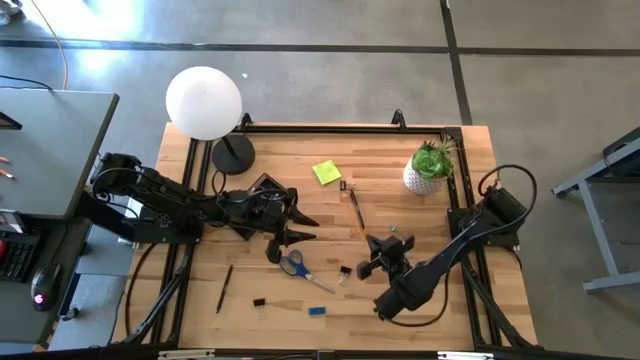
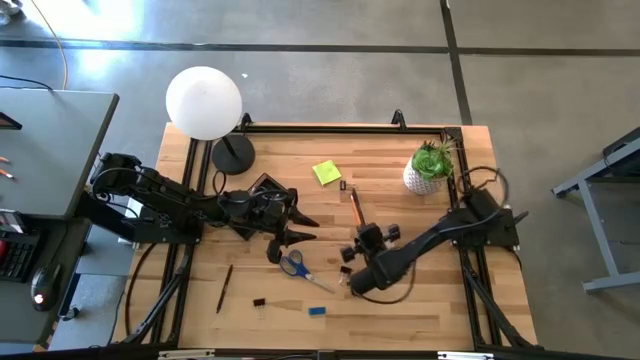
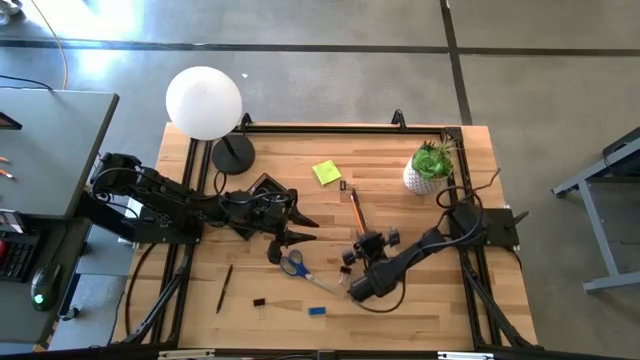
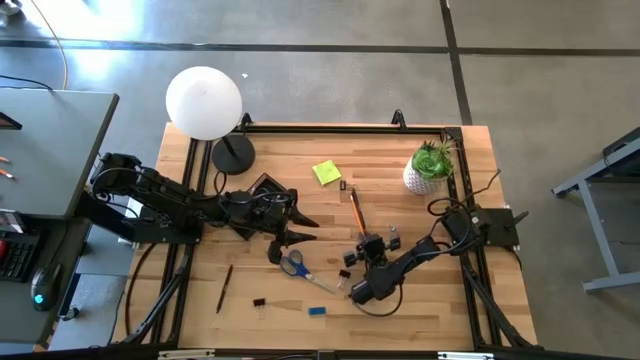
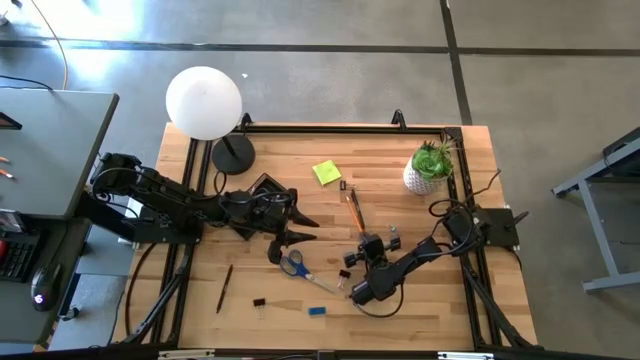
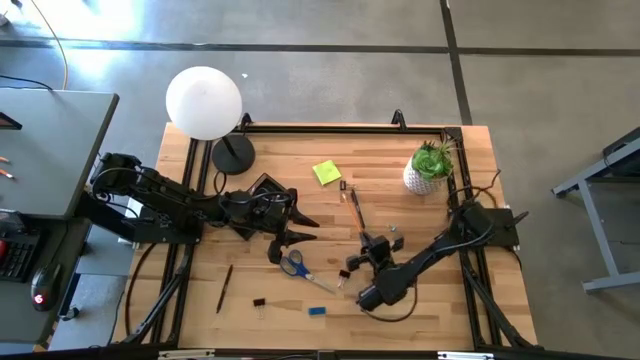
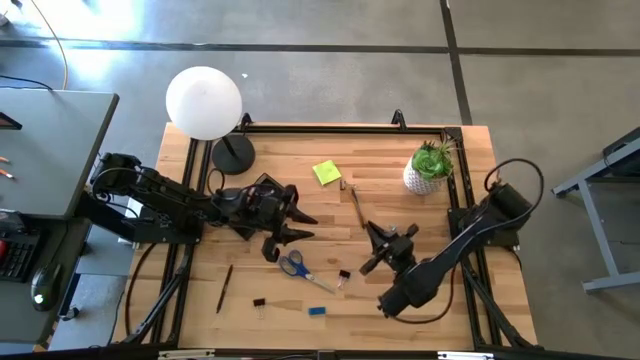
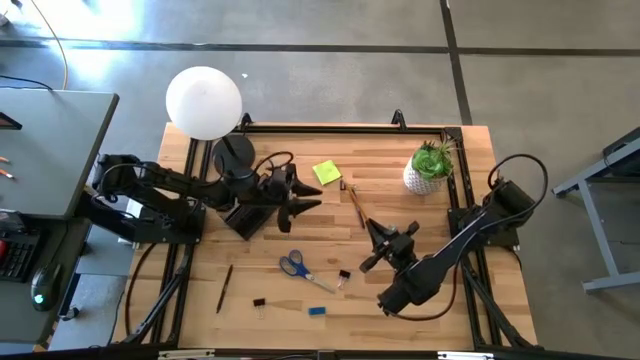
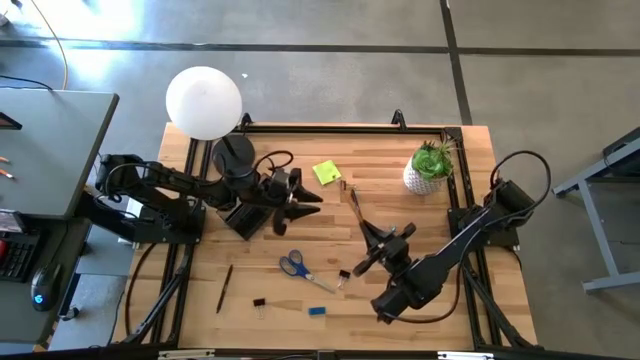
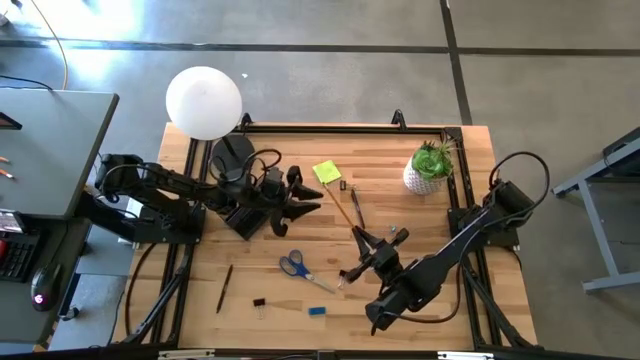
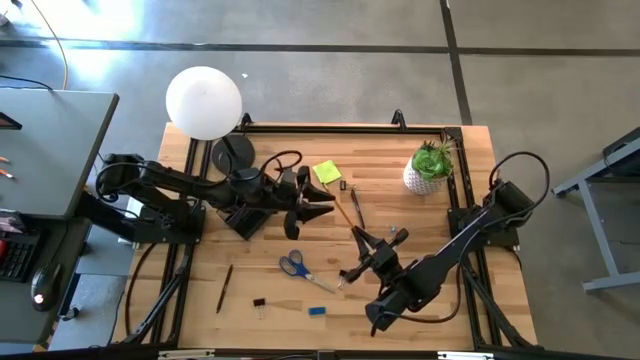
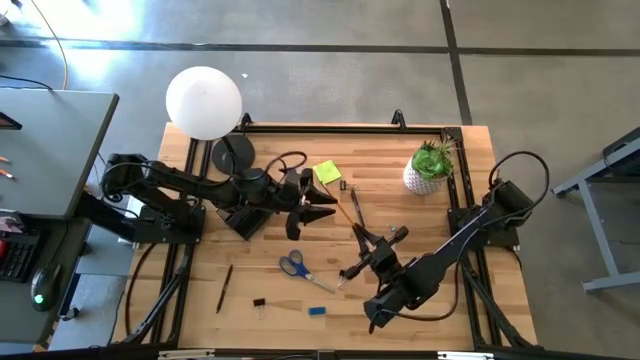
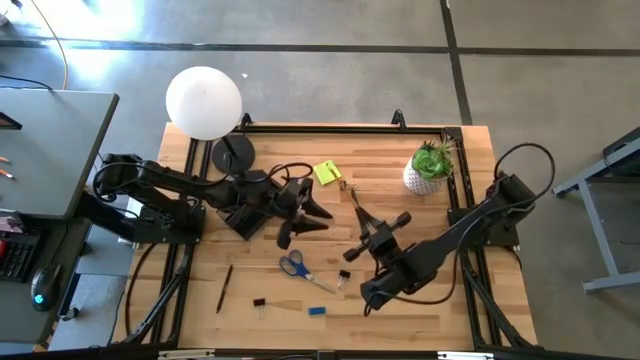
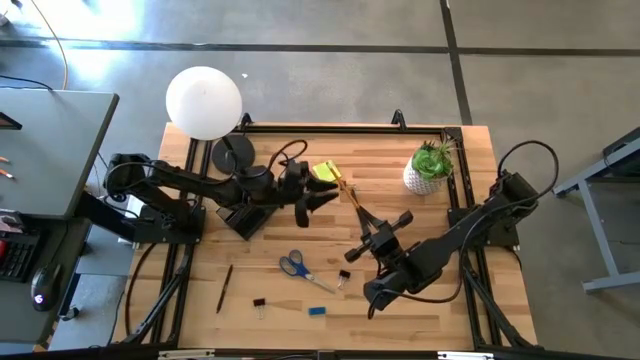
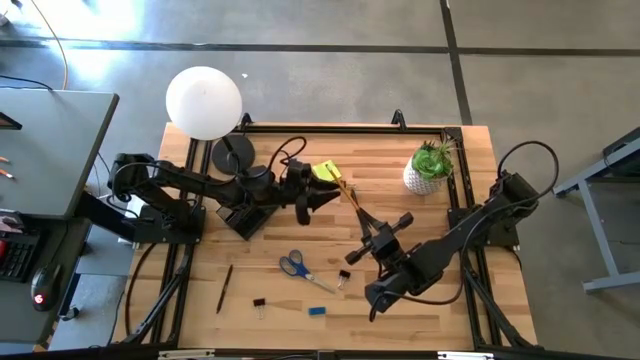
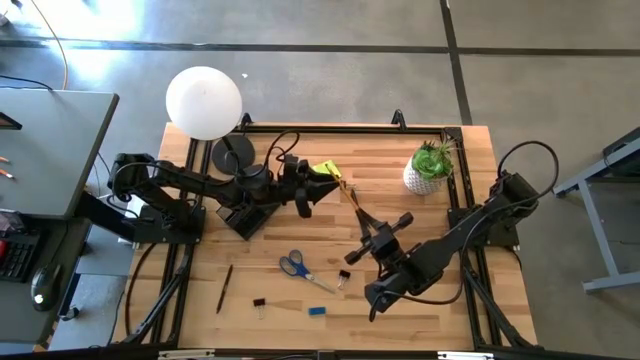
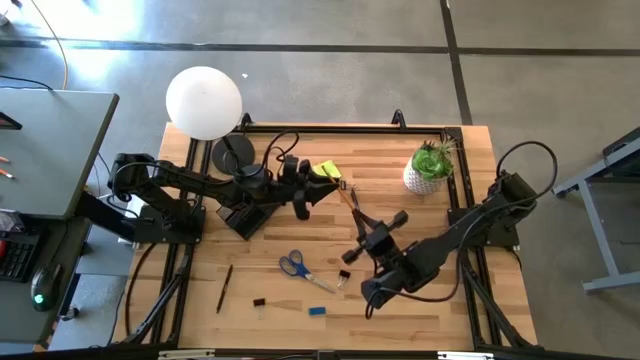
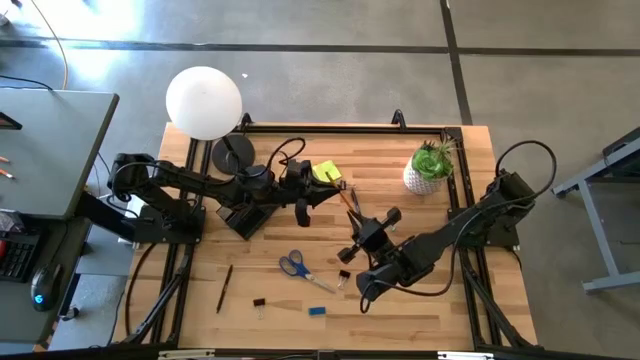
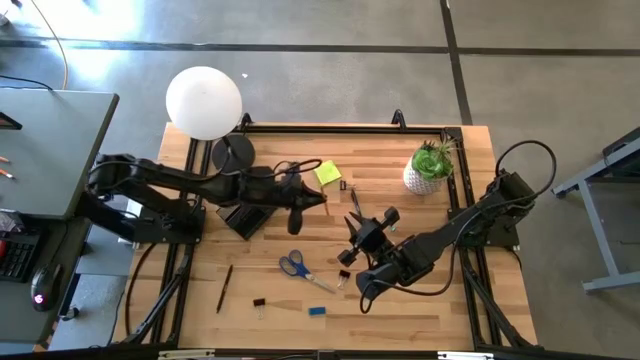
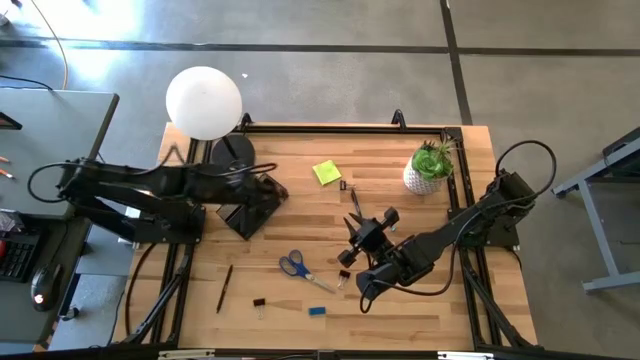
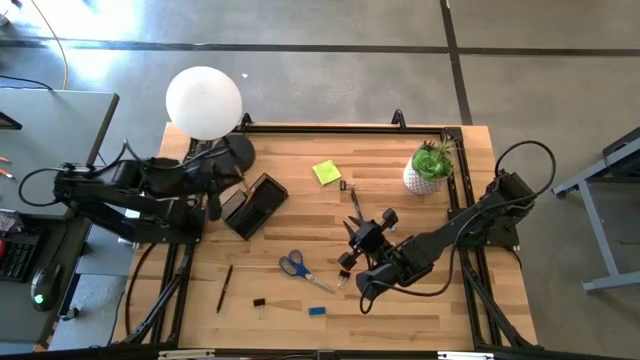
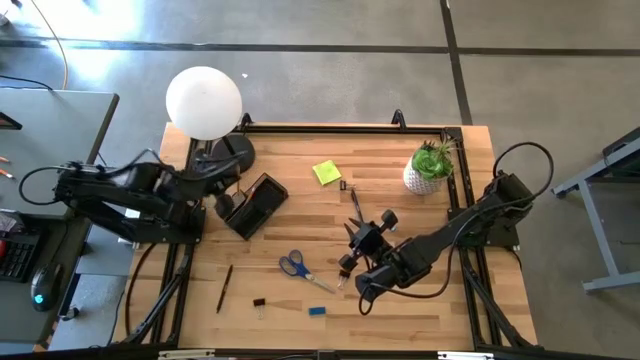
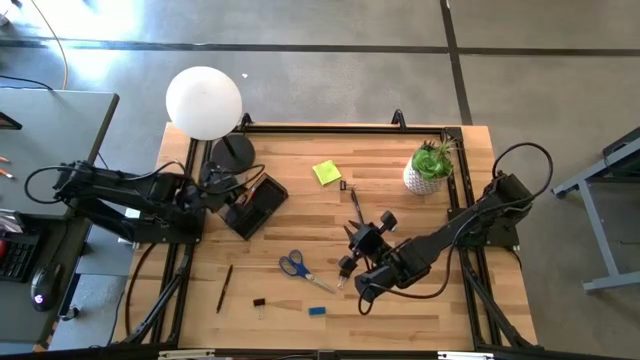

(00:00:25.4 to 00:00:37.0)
Task: Pick and place office supplies into organizer
Put the orange pencil into the black mesh desk organizer

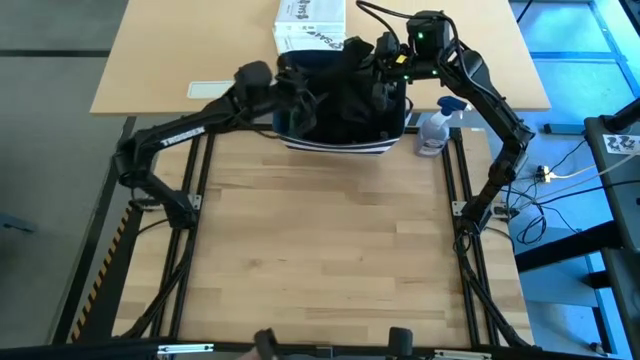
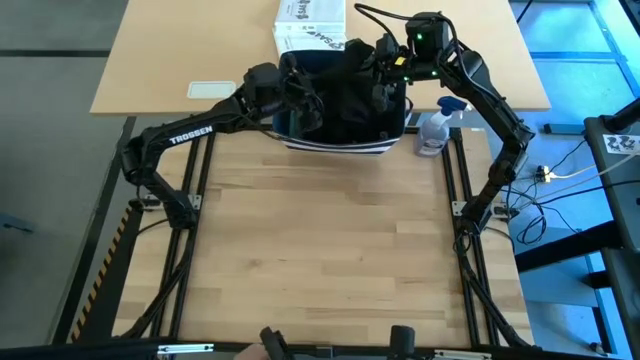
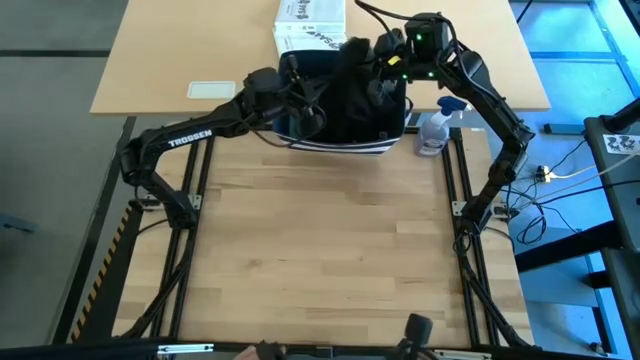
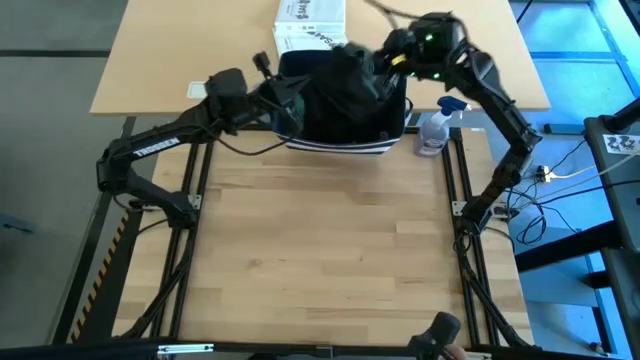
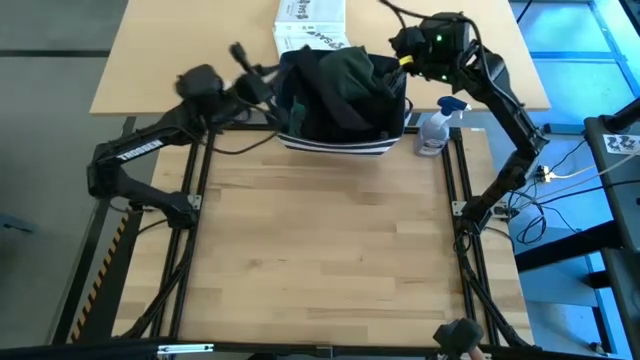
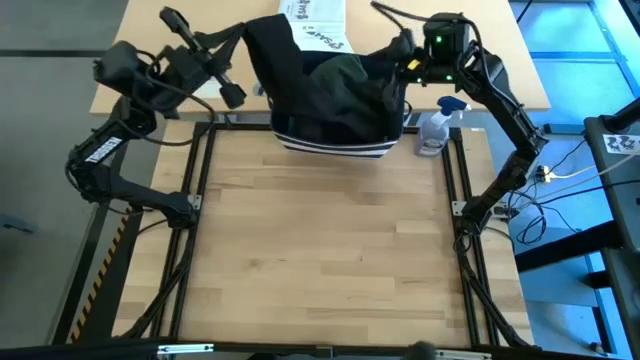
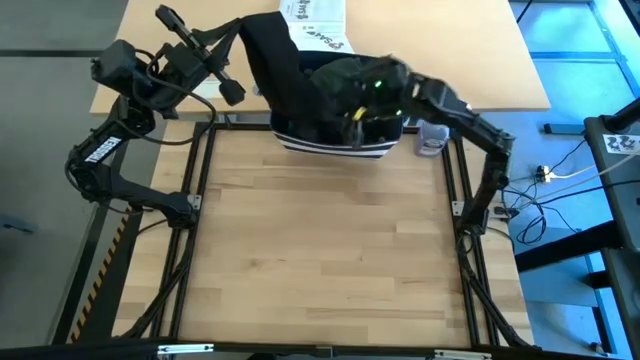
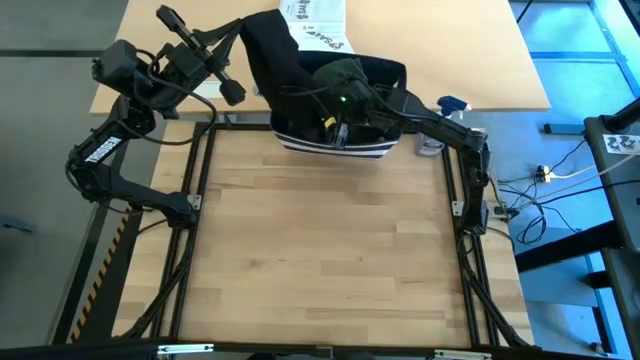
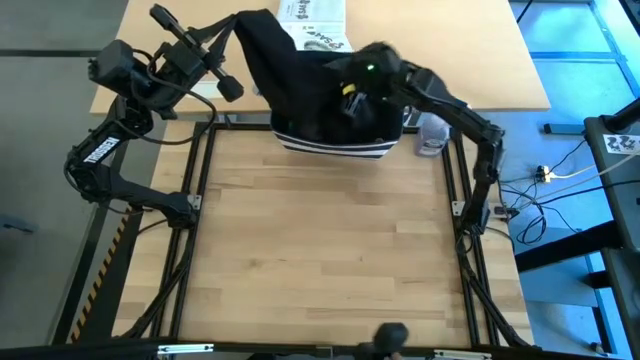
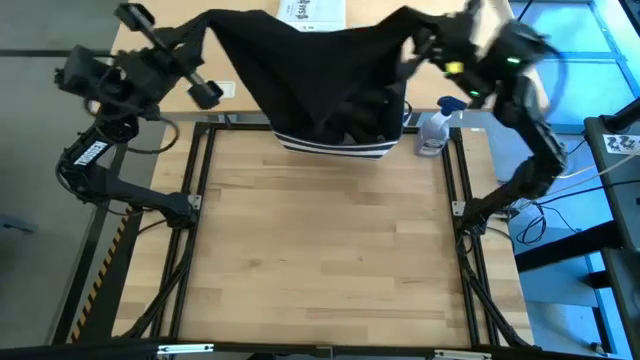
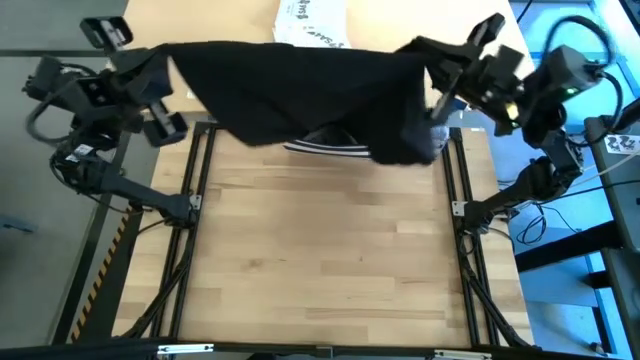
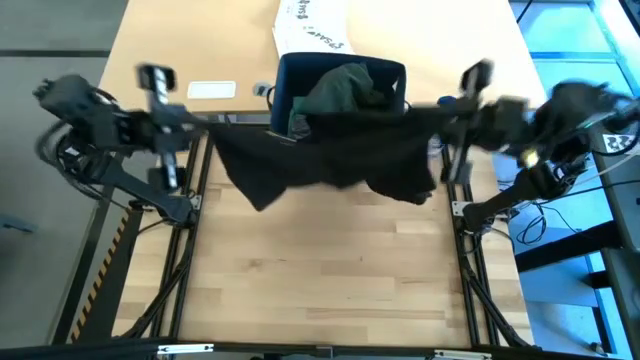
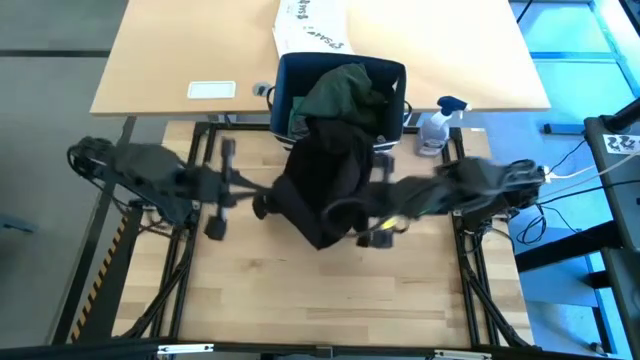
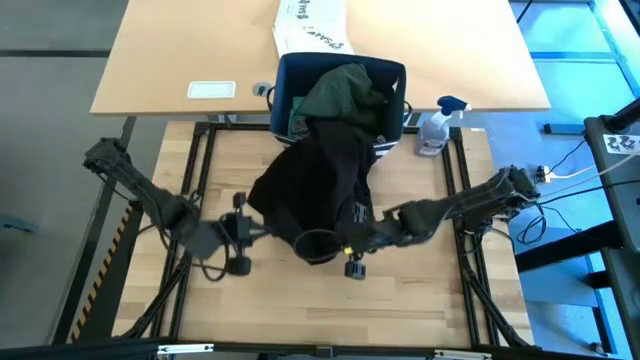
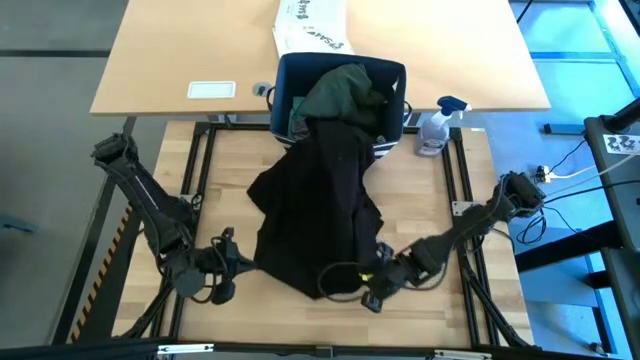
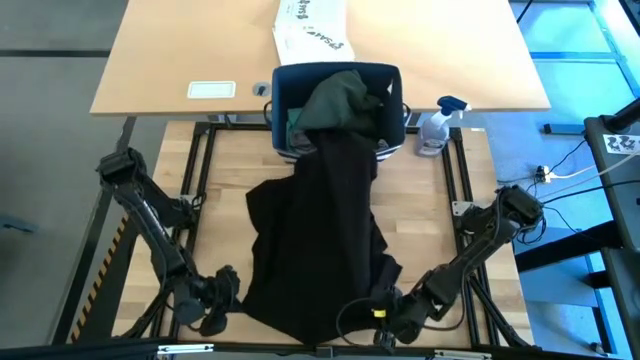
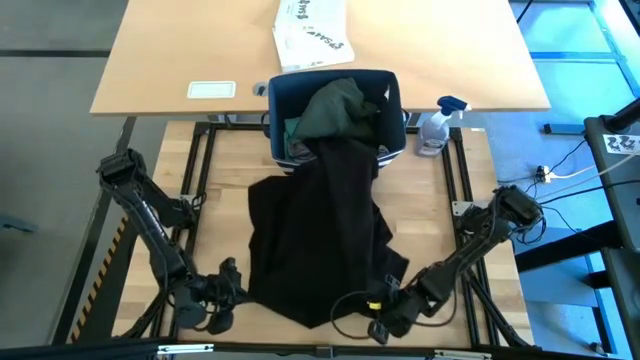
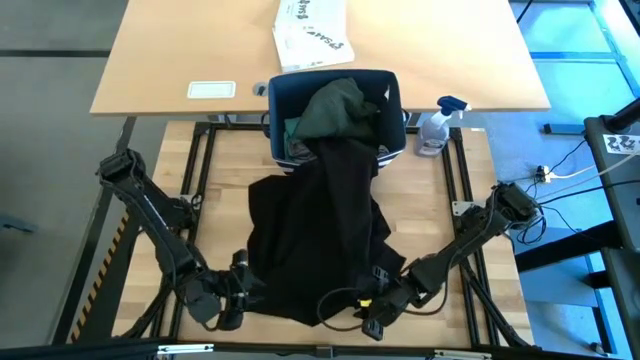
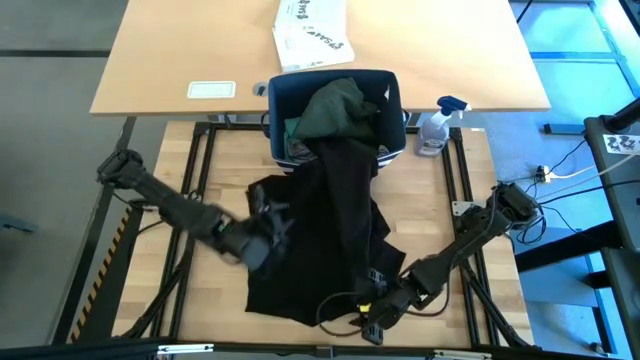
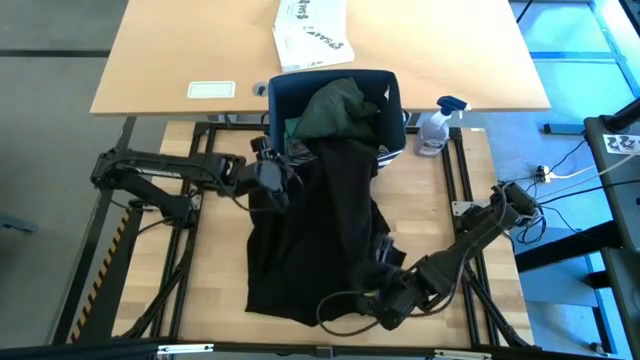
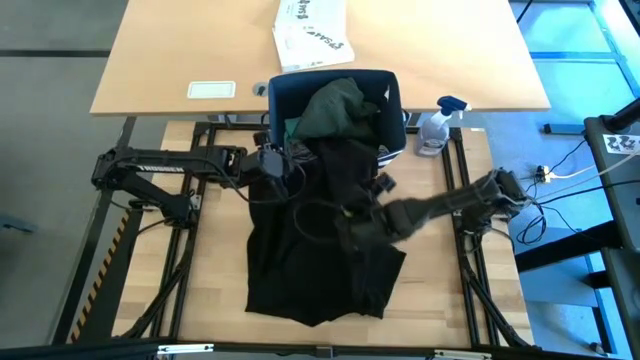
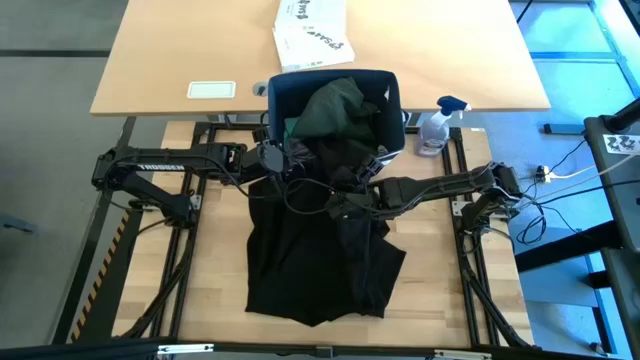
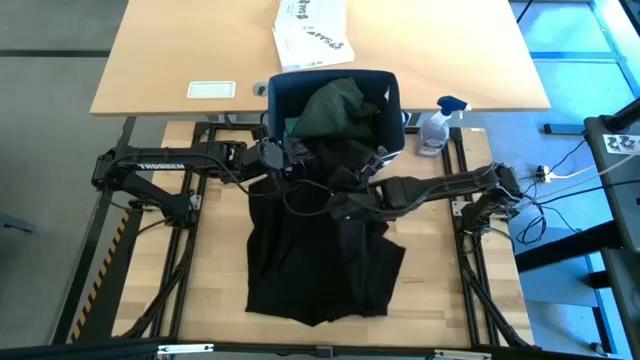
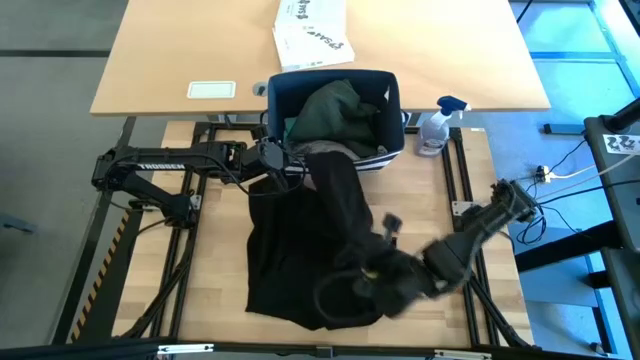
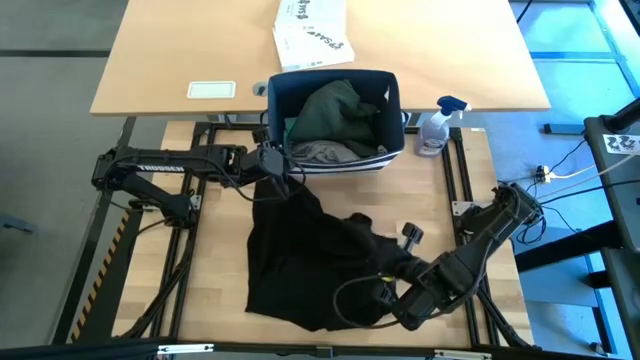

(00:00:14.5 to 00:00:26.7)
Task: Fold Laundry from Bin
Remove the black shirt from the blue bin
